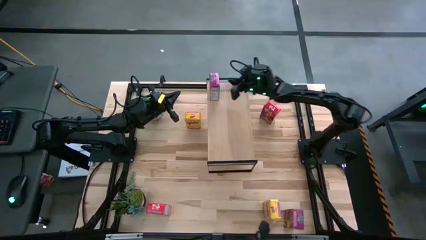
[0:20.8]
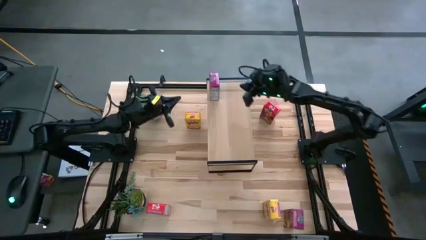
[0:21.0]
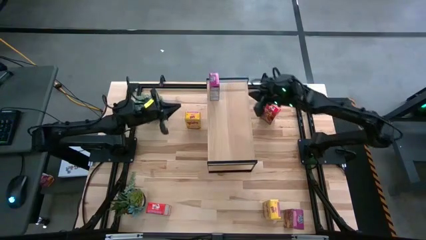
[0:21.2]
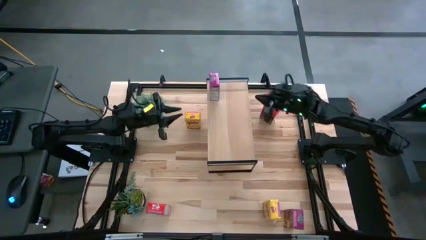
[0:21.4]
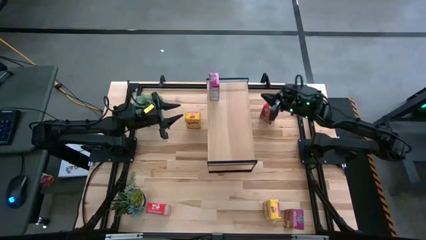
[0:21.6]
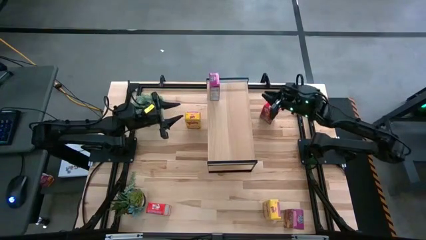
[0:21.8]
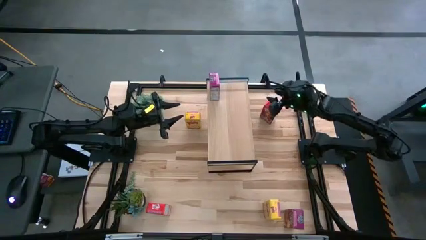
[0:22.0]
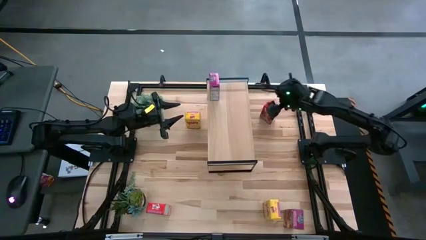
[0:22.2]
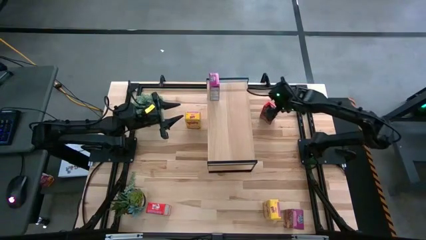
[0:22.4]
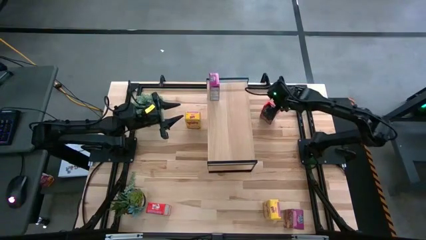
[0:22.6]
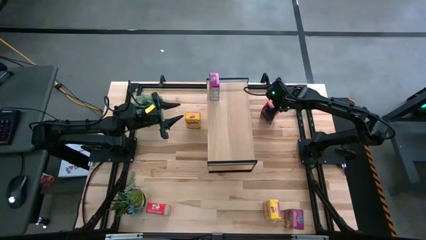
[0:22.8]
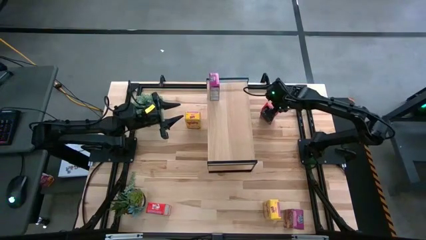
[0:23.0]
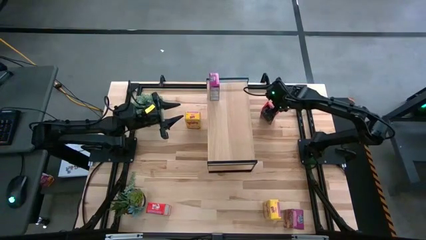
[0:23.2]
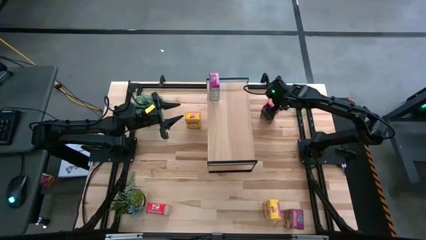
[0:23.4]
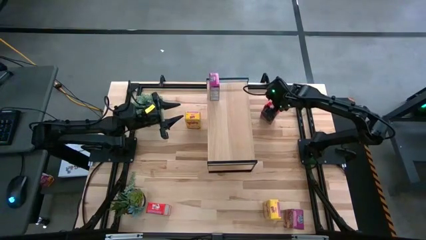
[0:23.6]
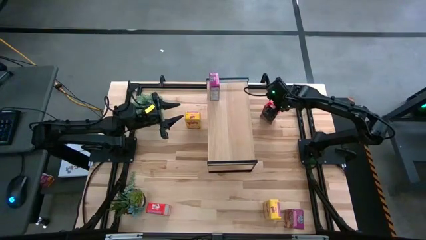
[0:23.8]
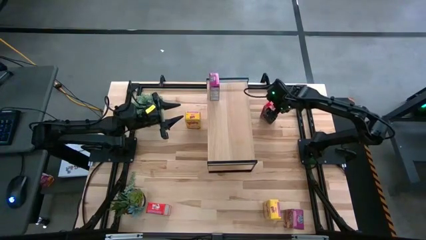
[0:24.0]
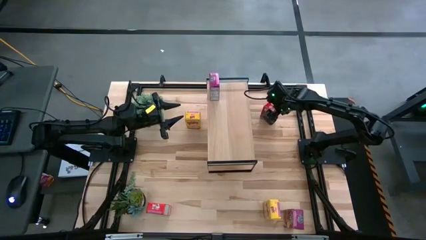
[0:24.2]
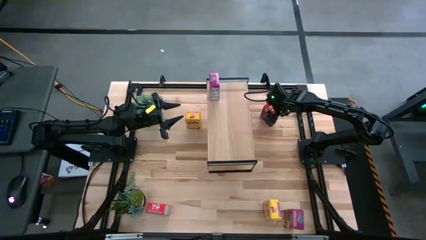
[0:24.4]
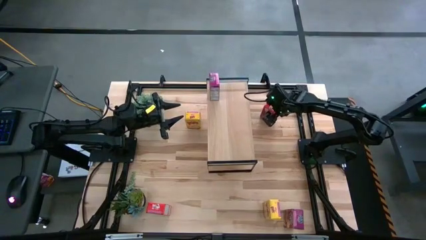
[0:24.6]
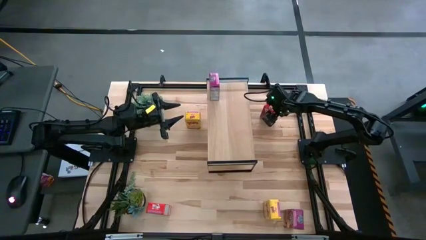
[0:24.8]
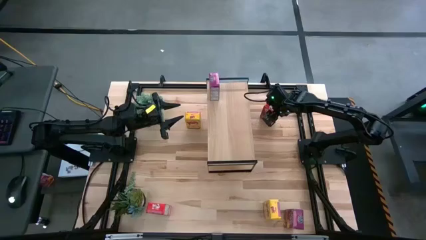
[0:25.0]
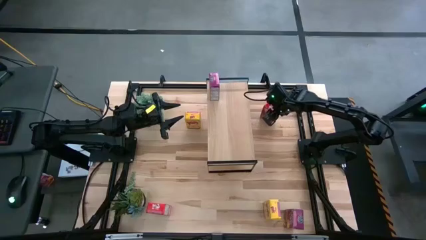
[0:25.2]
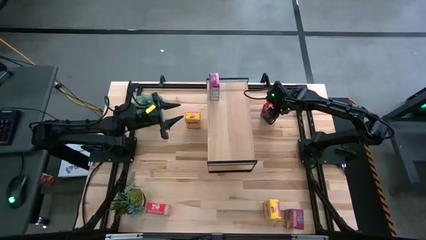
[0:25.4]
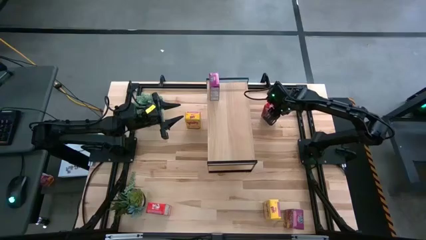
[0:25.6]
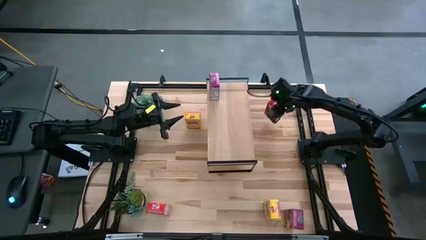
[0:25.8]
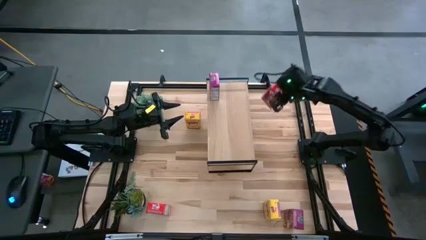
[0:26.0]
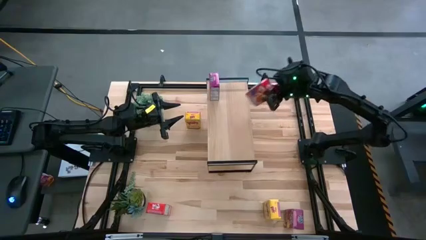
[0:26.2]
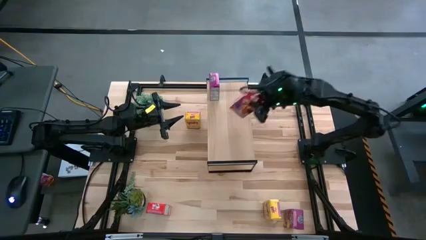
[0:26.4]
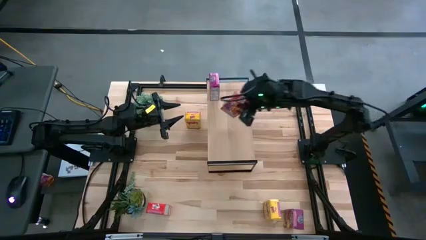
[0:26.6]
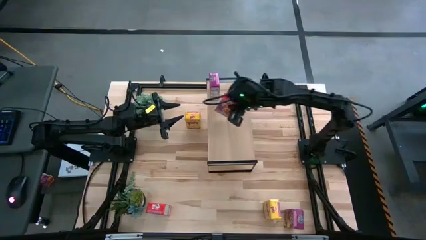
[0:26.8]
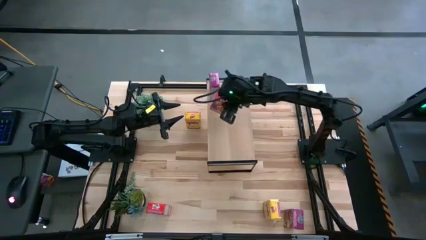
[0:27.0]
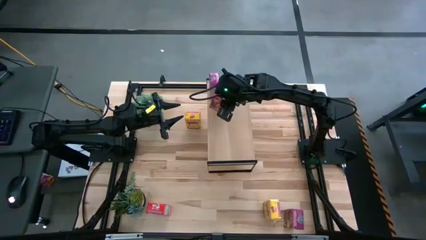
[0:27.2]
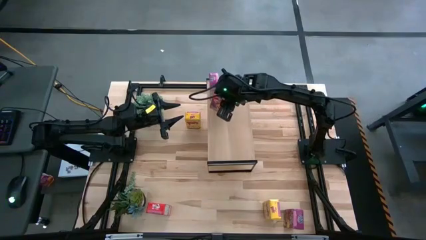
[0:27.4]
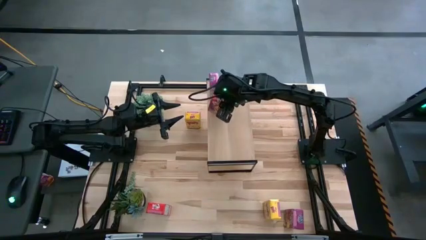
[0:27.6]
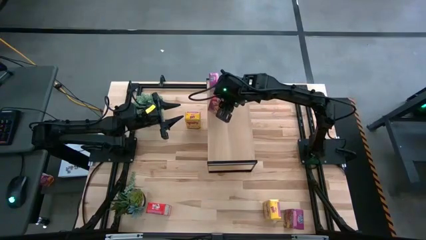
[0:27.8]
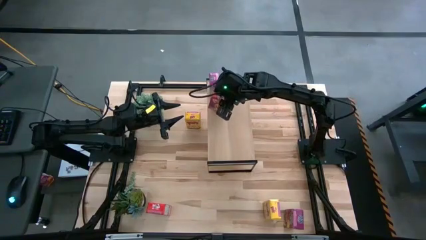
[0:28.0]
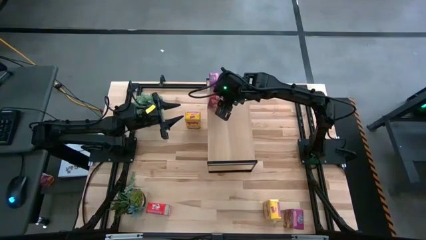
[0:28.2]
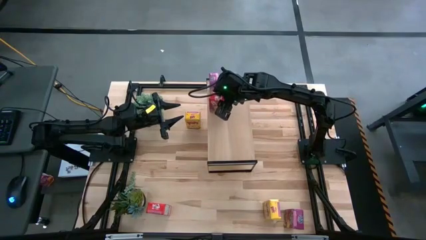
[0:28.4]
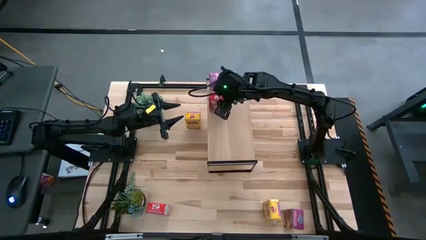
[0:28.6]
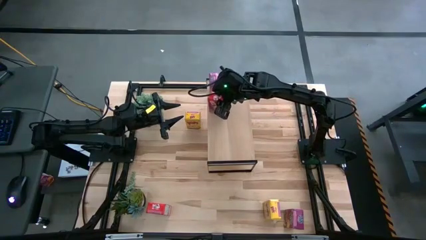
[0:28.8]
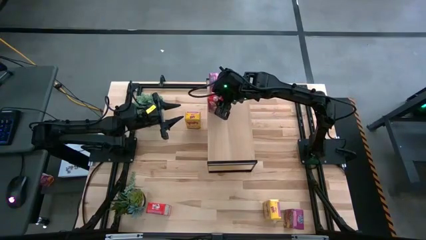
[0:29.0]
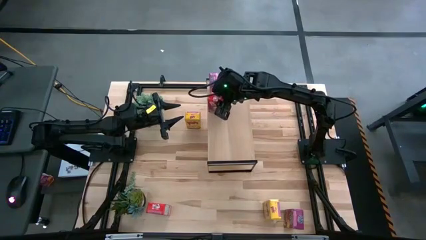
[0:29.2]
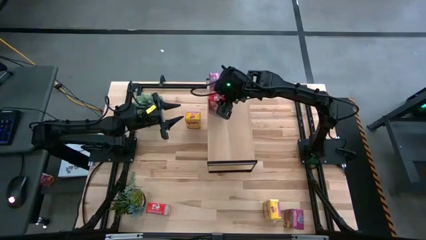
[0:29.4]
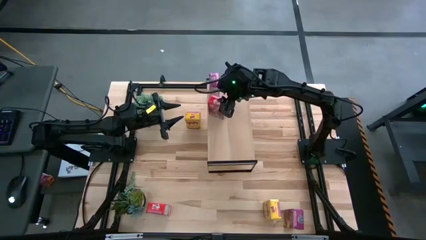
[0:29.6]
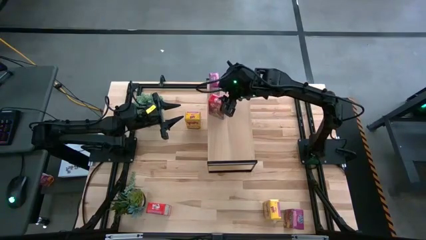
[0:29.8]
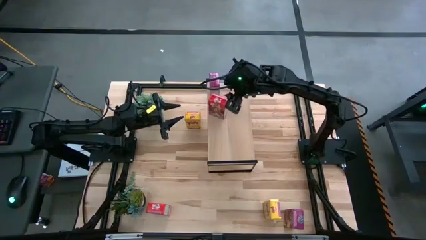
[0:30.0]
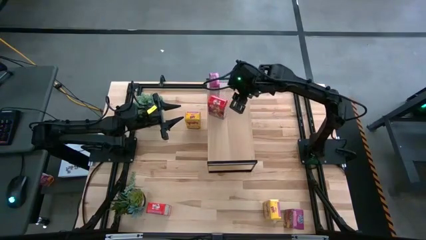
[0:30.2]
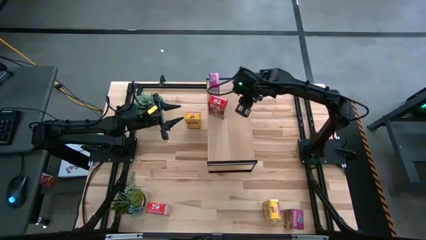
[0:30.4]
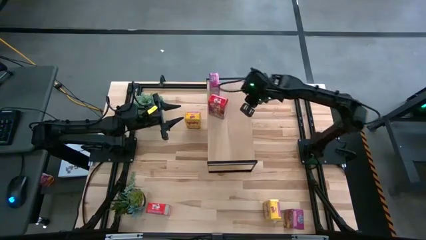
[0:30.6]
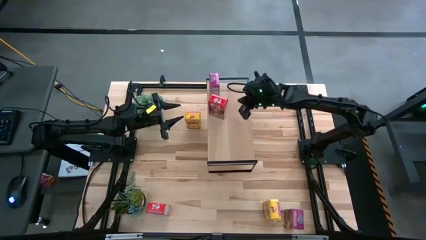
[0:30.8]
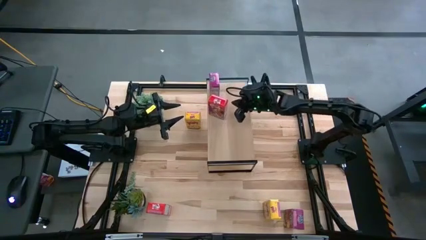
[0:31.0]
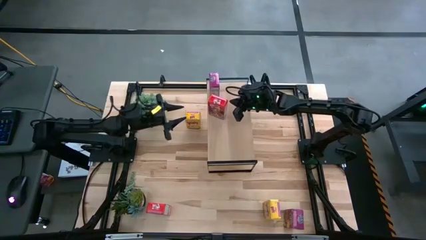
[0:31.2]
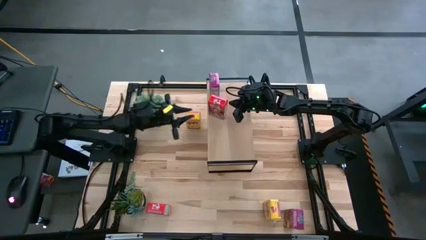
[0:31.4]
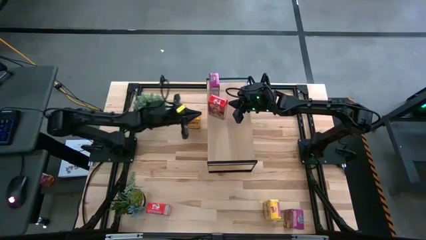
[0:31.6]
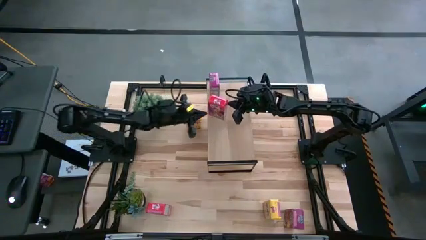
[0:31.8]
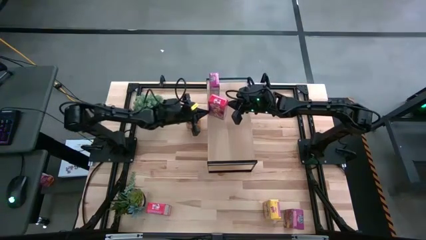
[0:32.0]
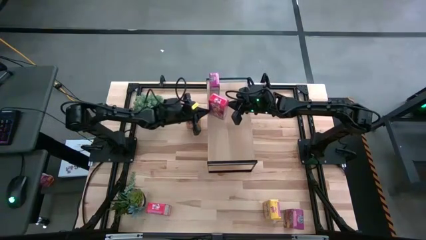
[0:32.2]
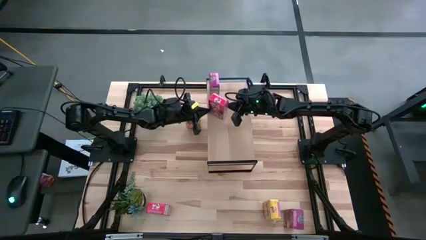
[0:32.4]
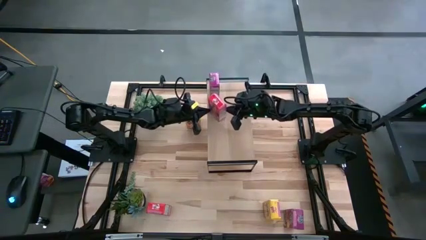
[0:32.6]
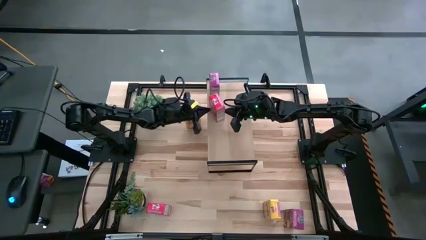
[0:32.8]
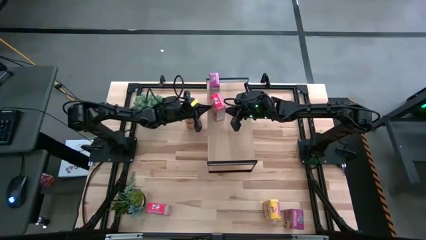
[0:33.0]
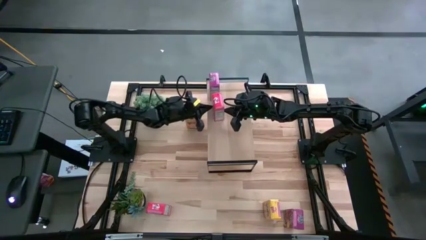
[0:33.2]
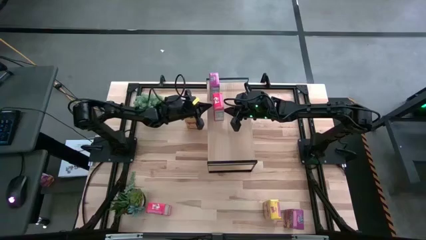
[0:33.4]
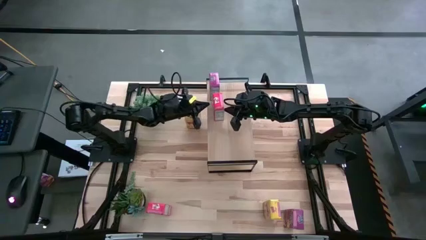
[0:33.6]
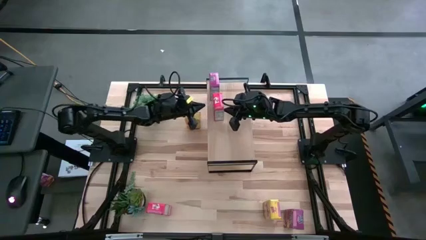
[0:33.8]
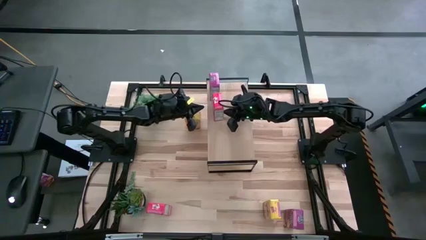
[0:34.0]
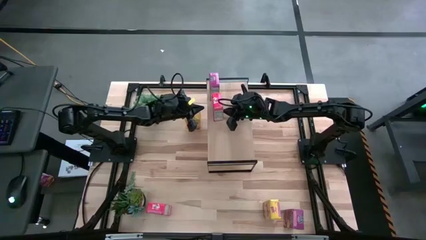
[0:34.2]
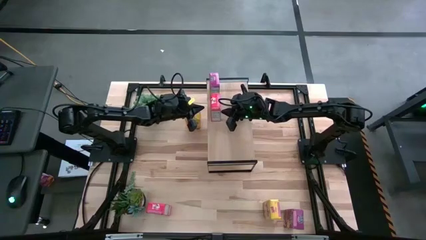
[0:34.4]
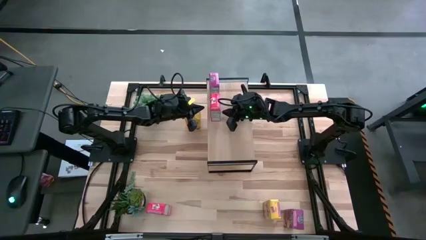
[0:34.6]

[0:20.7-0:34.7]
Task: Stack cereal on shelf
Put the top red cereal box on the shelf
